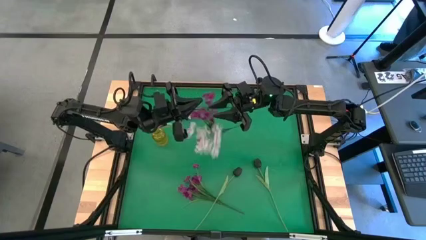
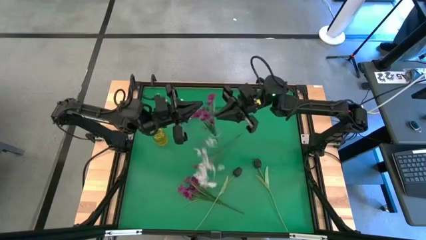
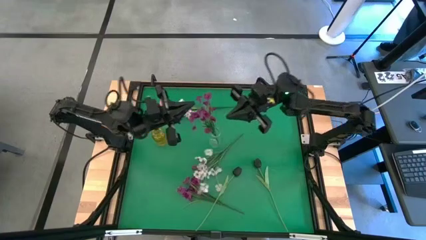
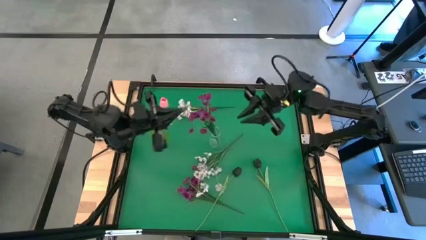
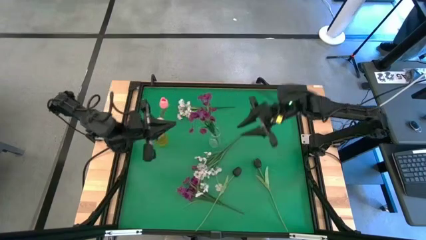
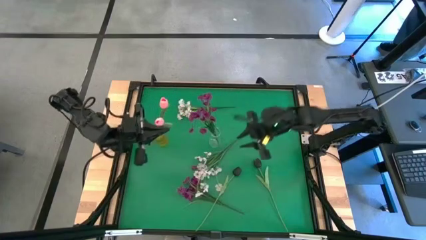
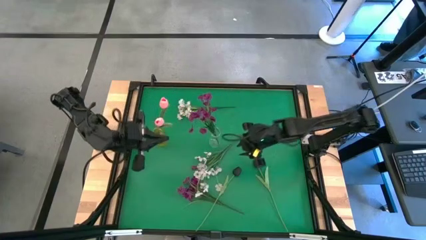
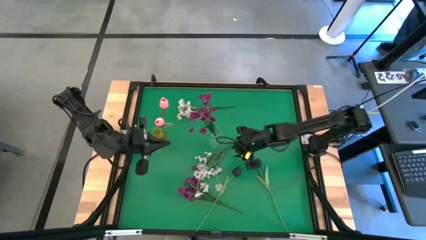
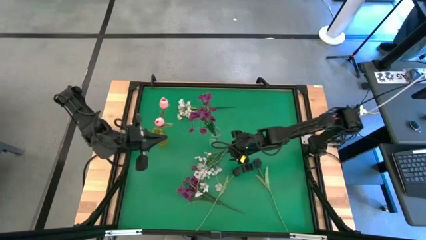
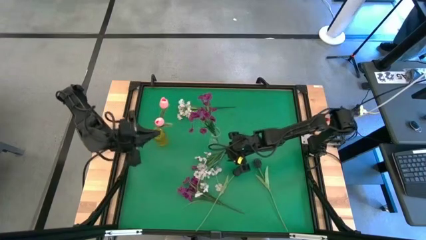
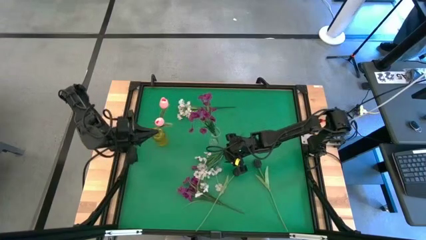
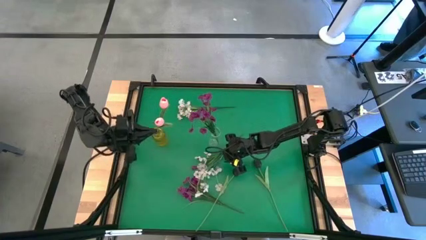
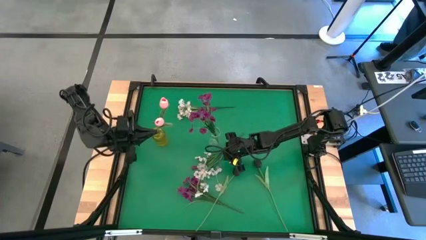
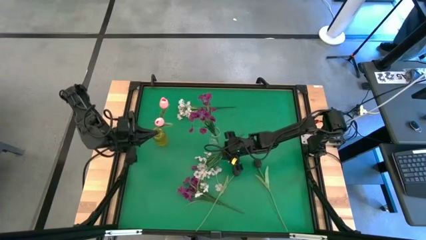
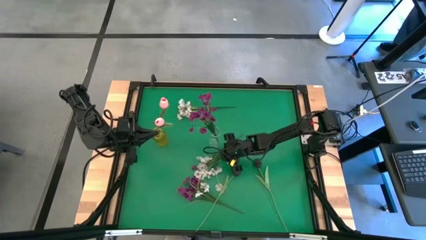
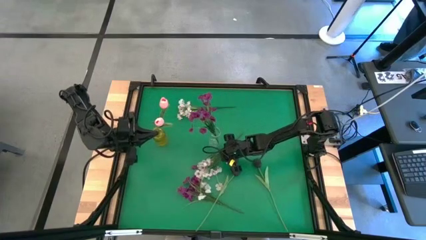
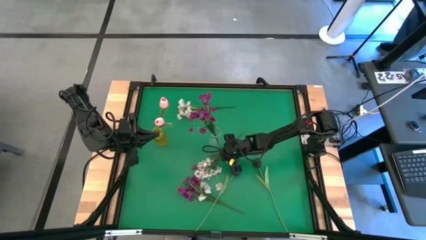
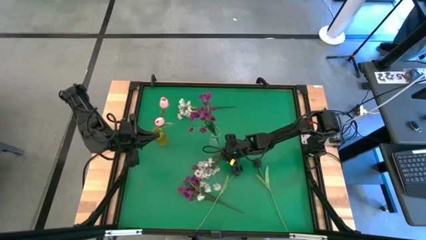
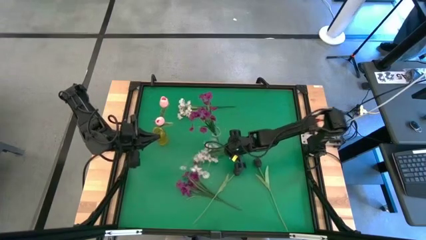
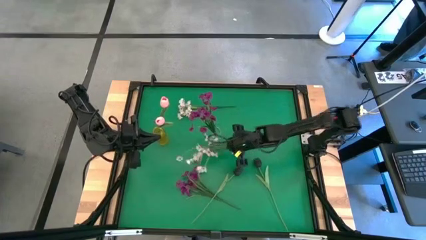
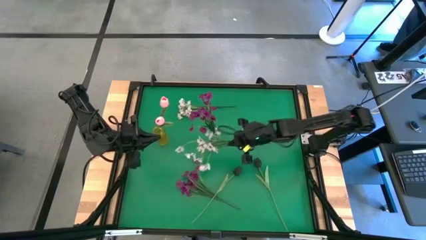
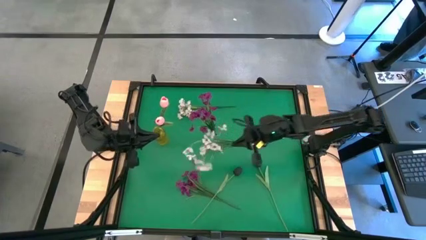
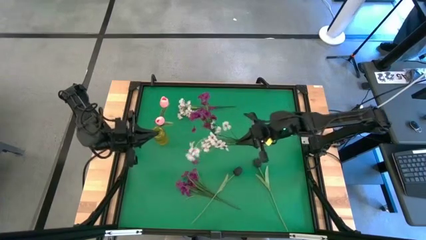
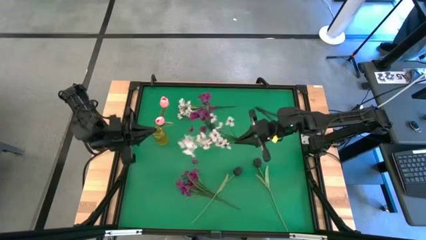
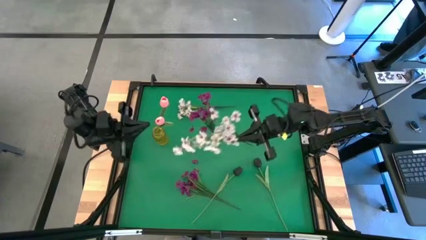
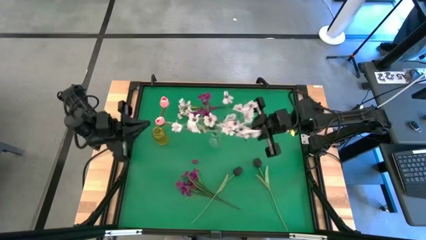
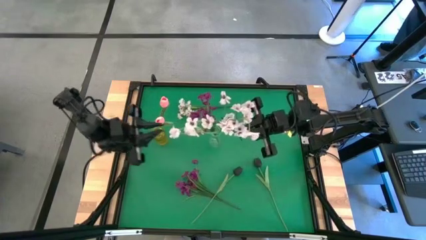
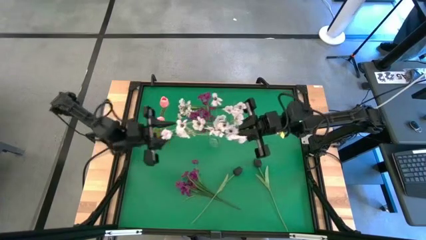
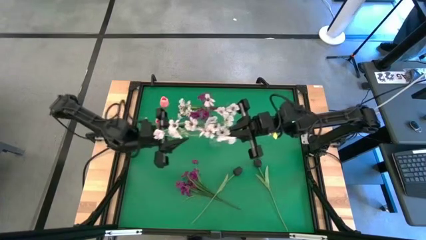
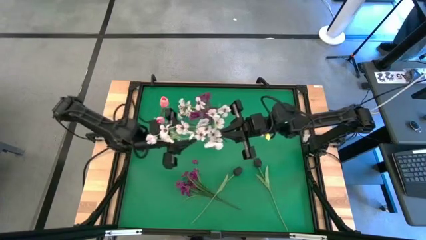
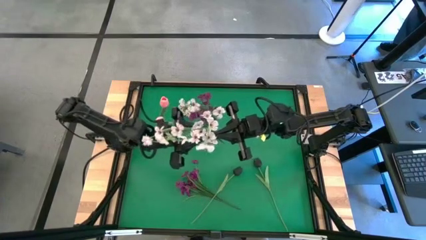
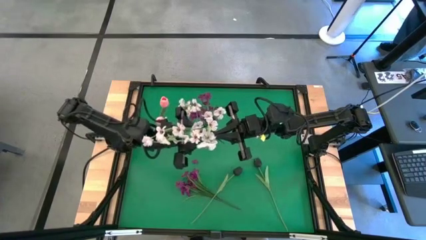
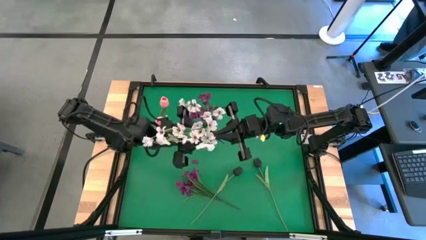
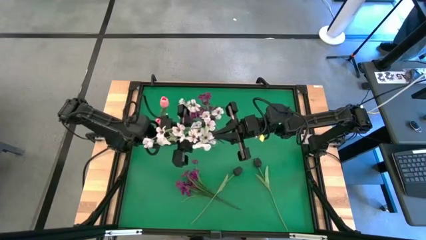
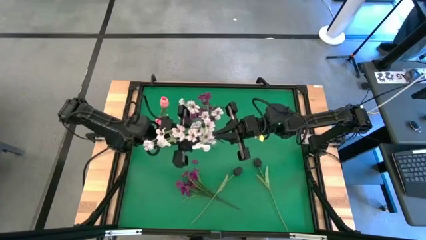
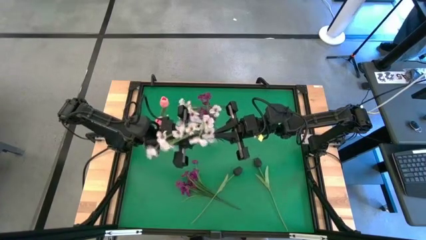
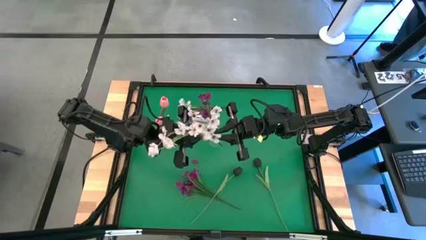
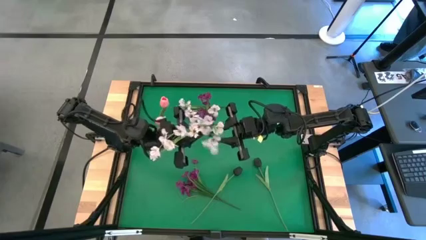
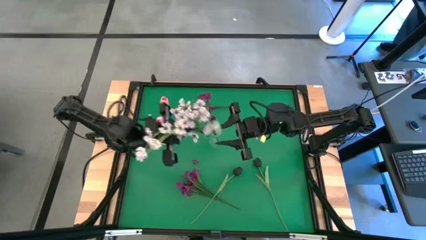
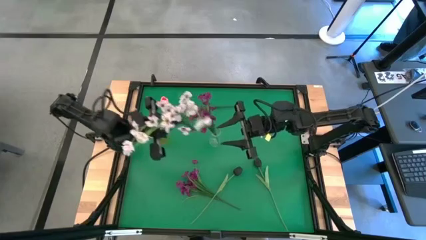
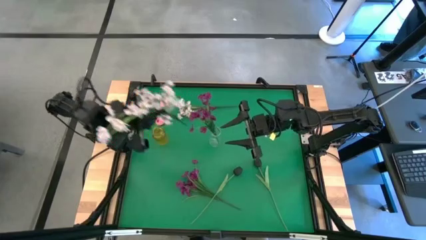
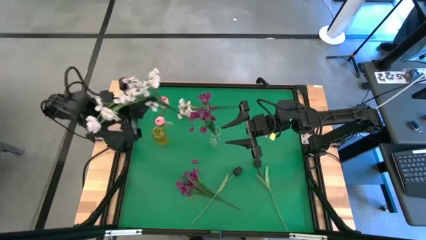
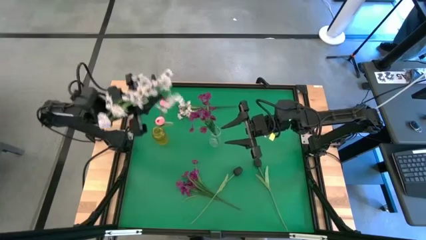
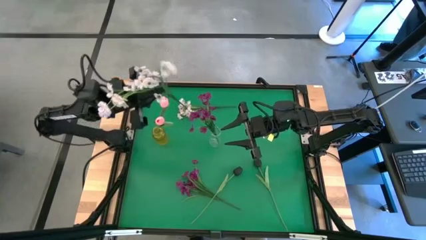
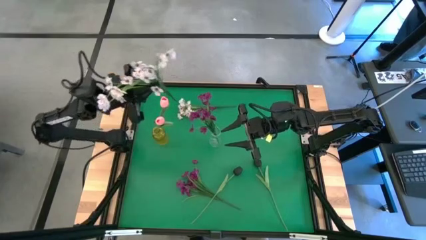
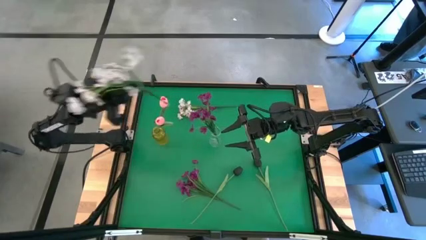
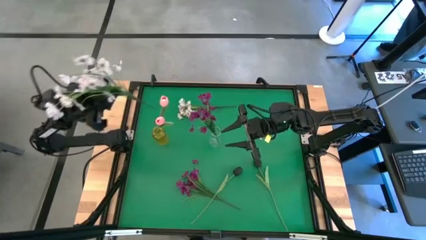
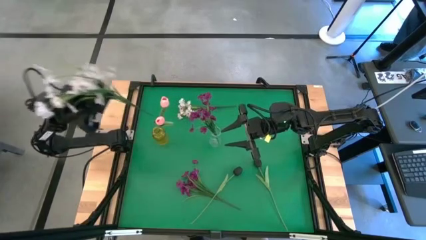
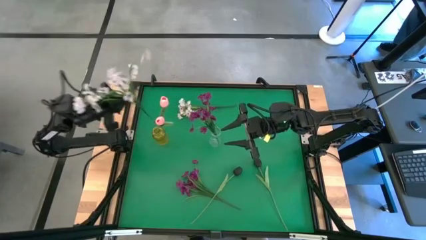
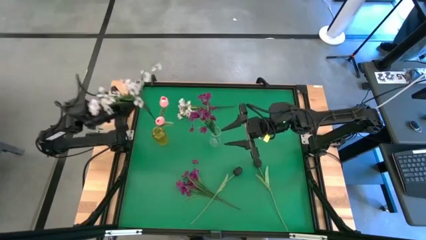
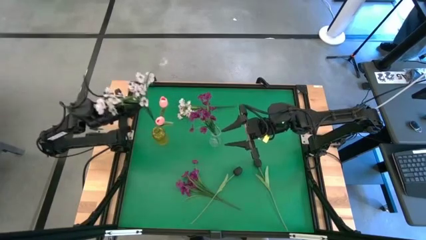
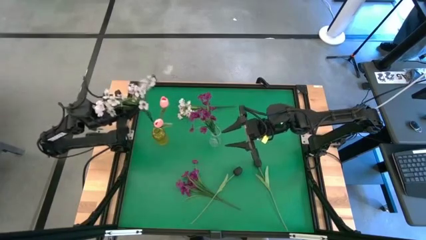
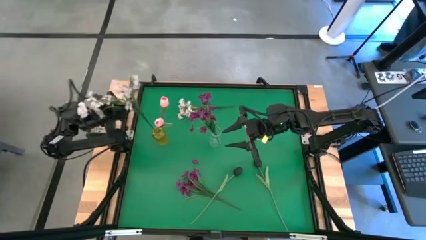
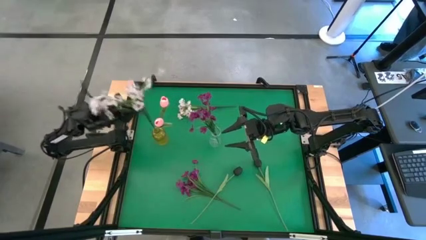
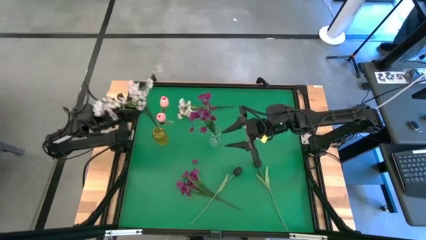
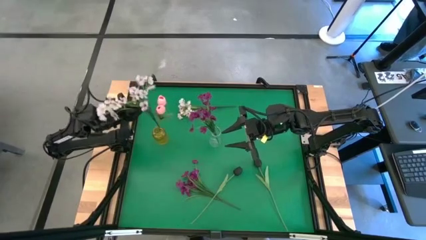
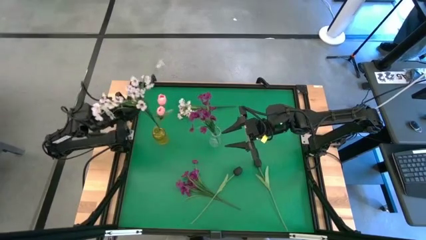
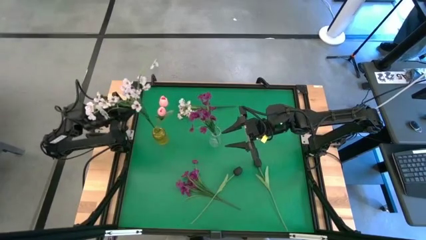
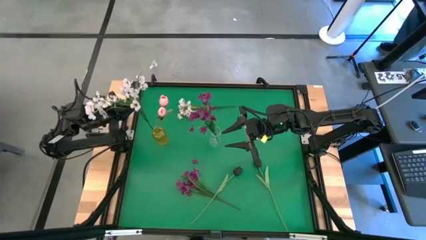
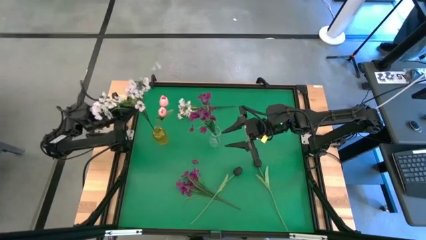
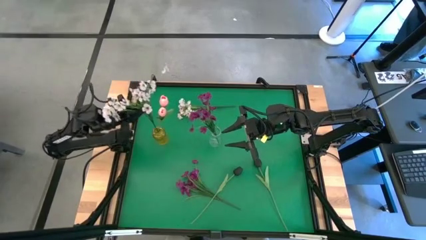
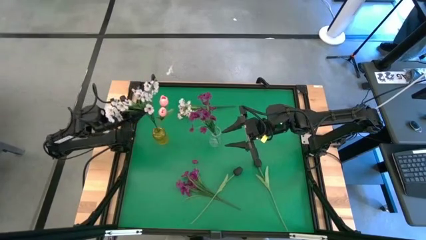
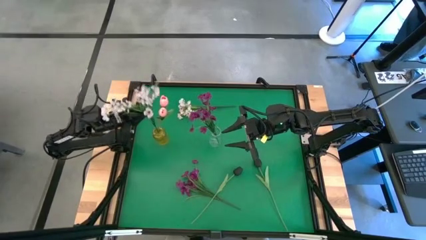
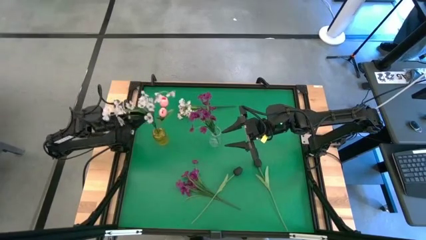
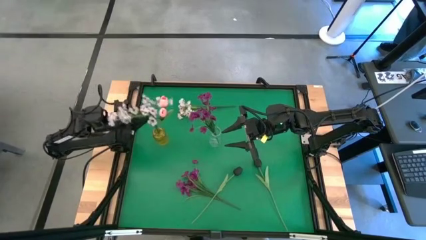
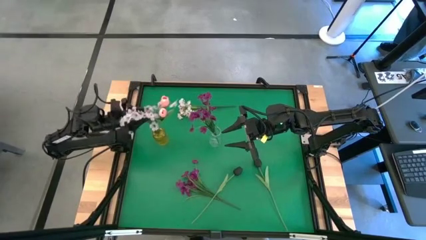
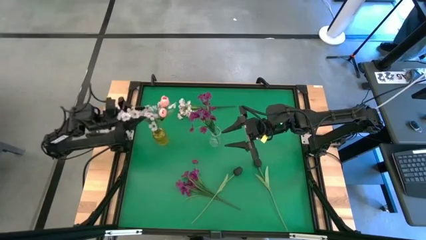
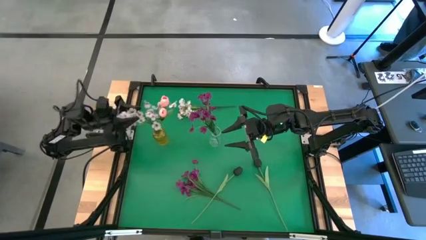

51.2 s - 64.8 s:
Task: Sort flowers into vase by color
Put the bottom white flower into the yellow vase

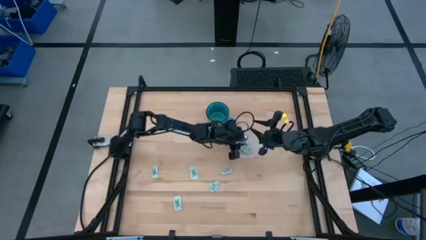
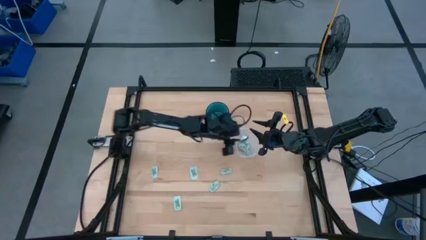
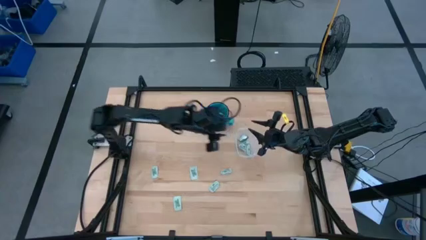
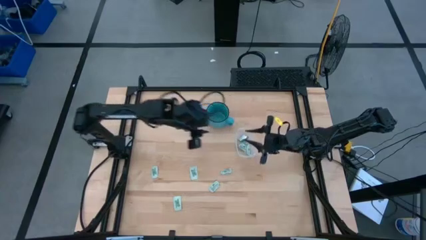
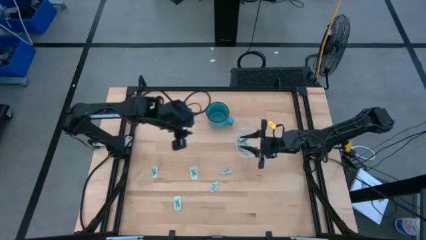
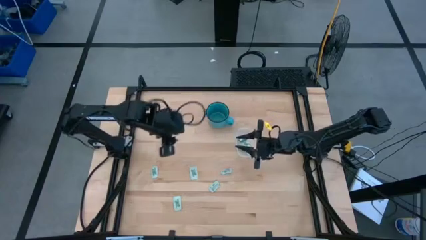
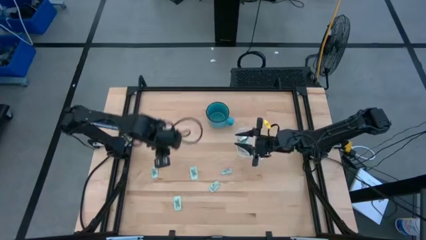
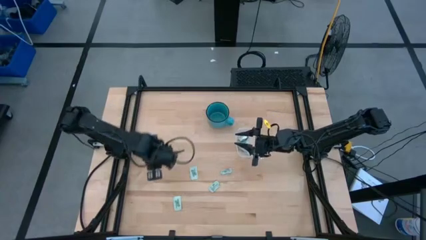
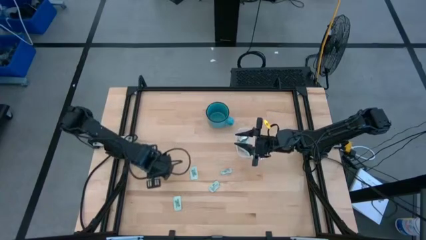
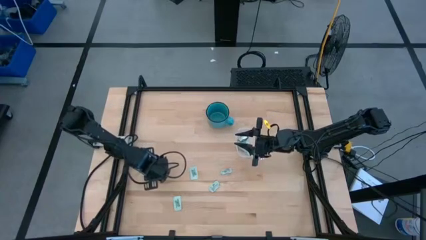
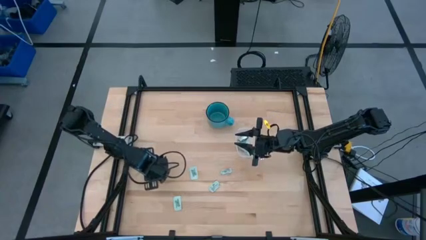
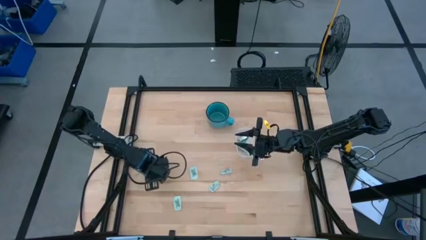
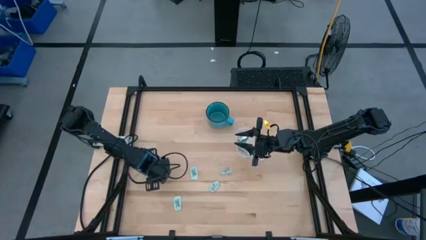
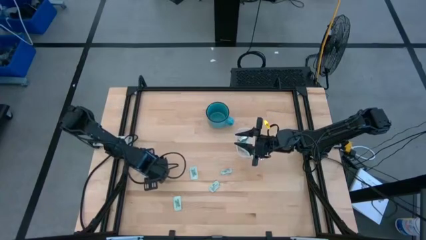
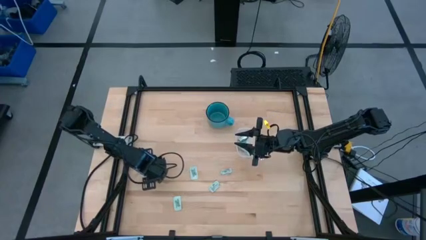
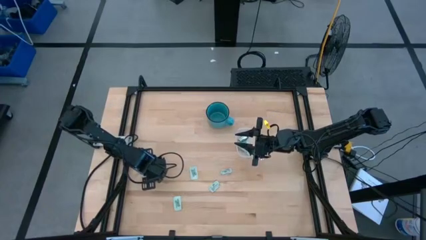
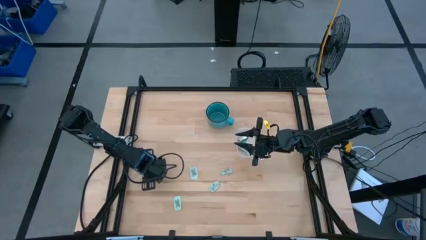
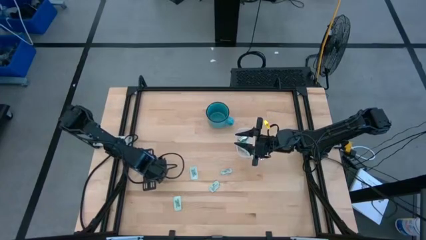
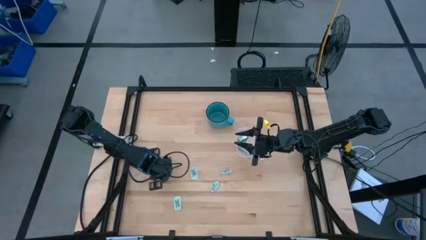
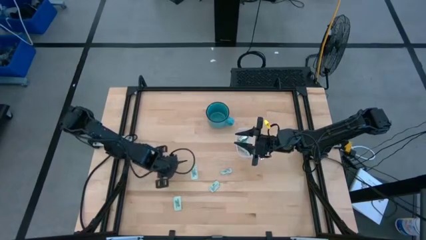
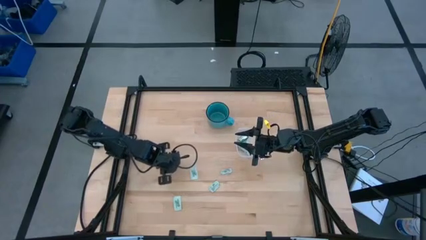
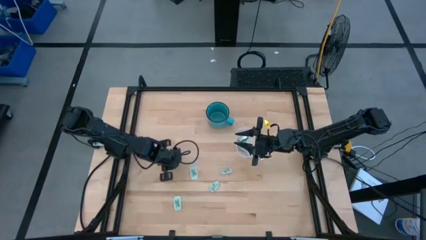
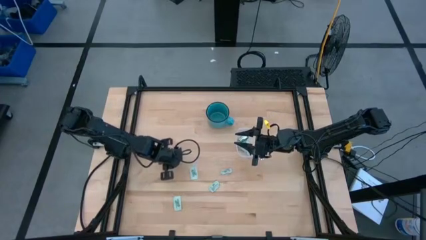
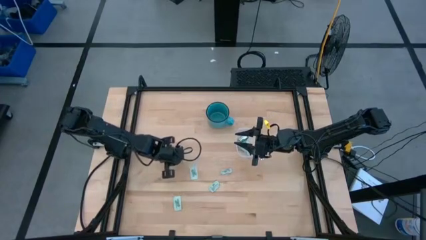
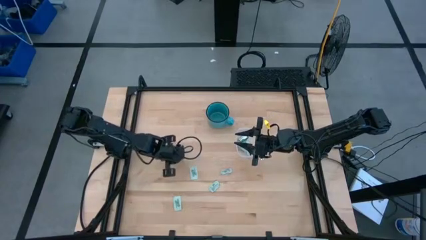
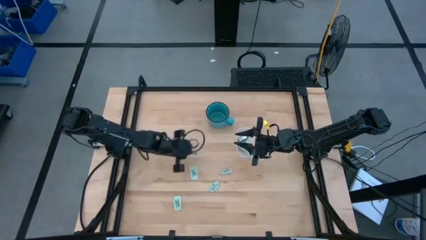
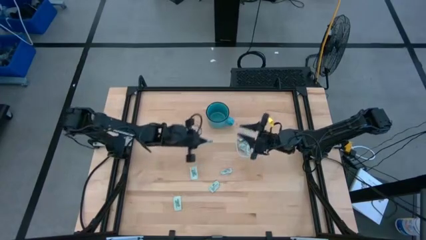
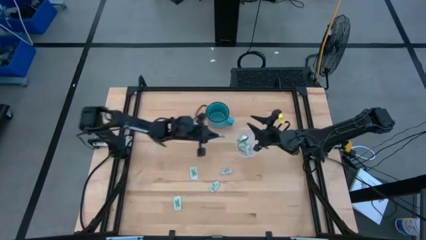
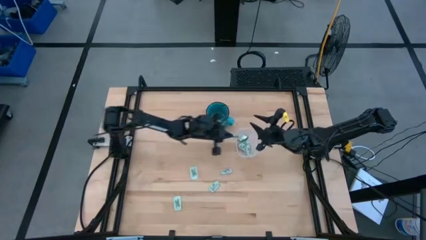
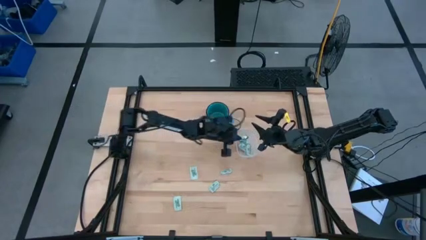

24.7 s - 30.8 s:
Task: Pick and place Stevia / Truvia into bins
Put the stevia packet into the transparent bin
